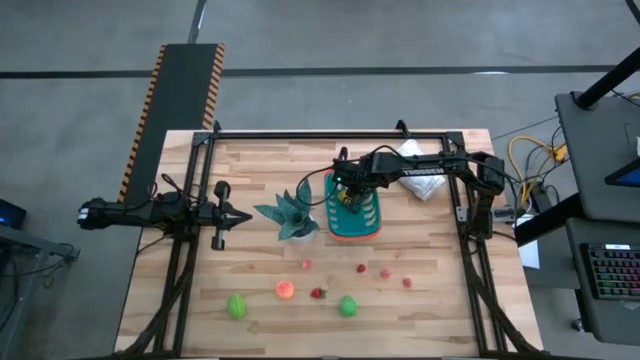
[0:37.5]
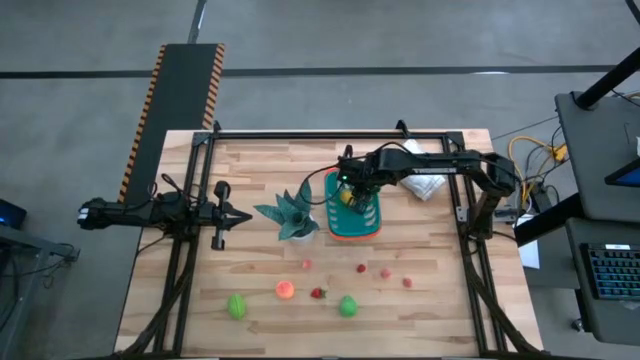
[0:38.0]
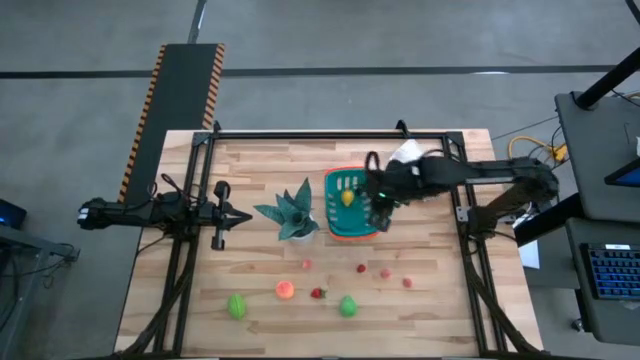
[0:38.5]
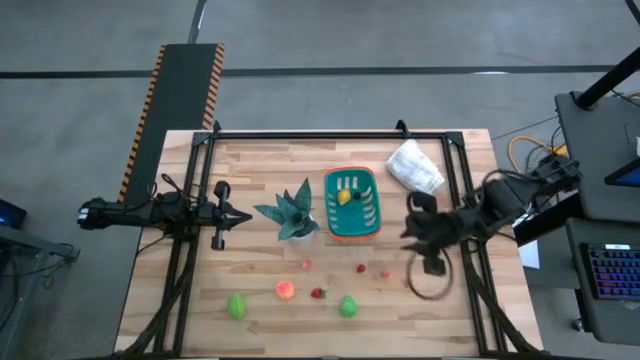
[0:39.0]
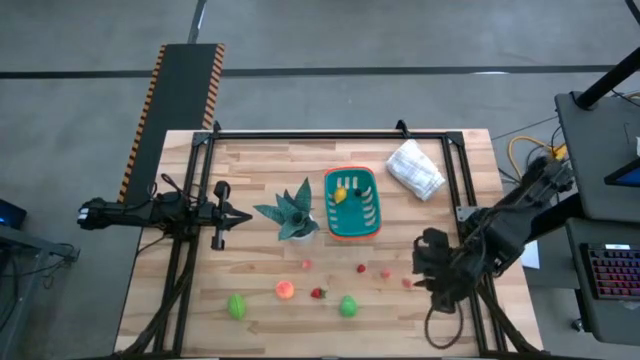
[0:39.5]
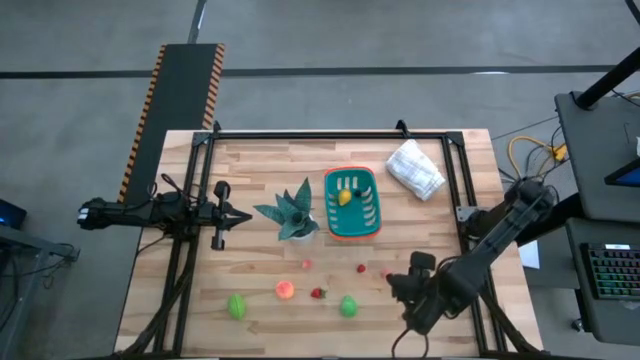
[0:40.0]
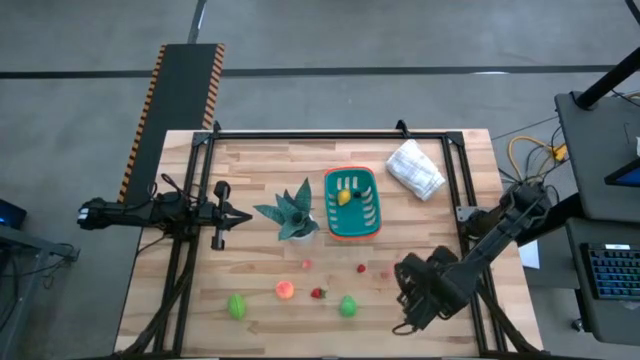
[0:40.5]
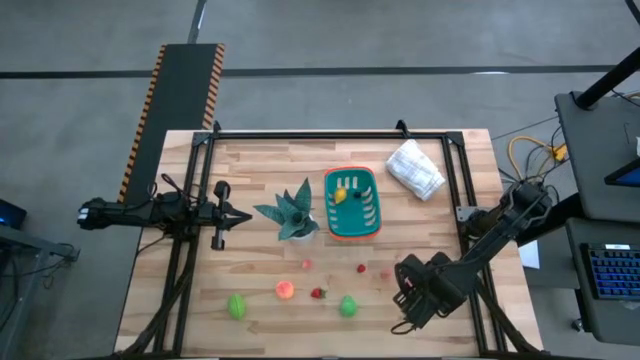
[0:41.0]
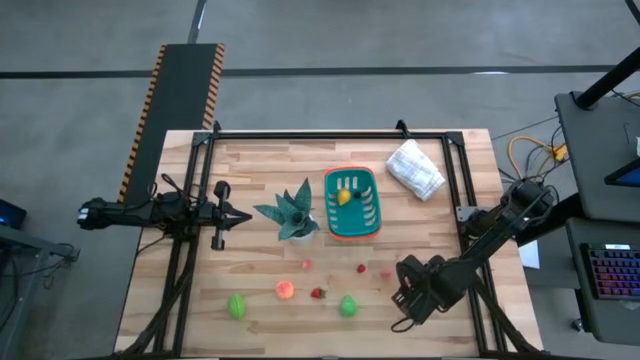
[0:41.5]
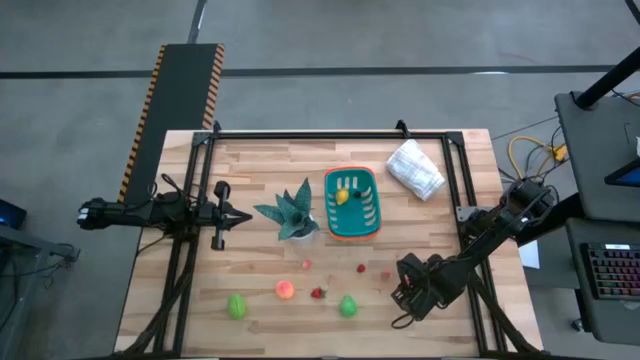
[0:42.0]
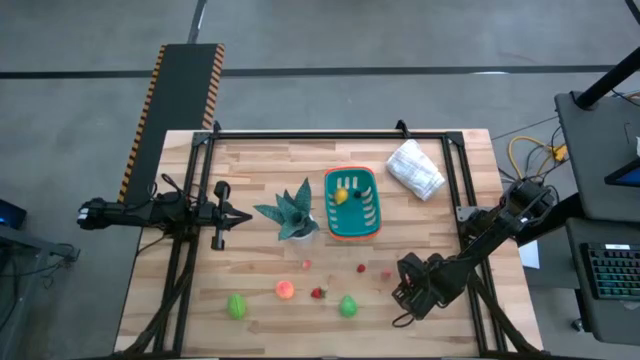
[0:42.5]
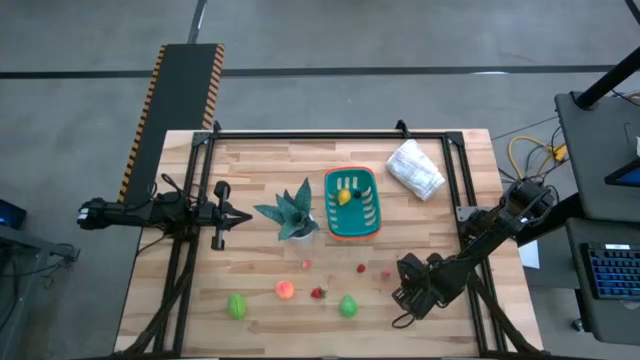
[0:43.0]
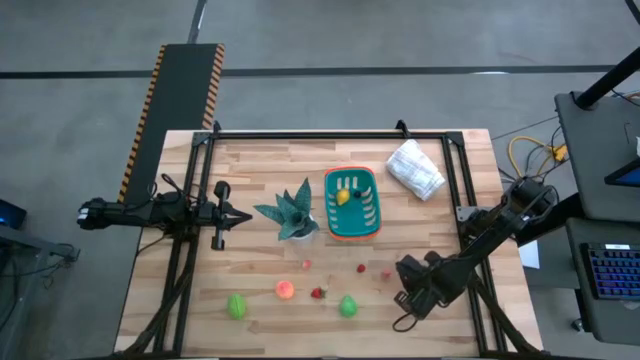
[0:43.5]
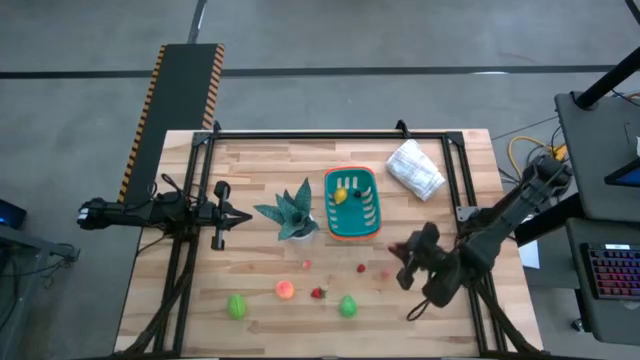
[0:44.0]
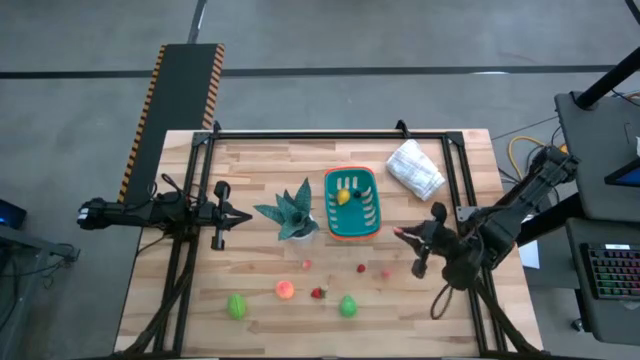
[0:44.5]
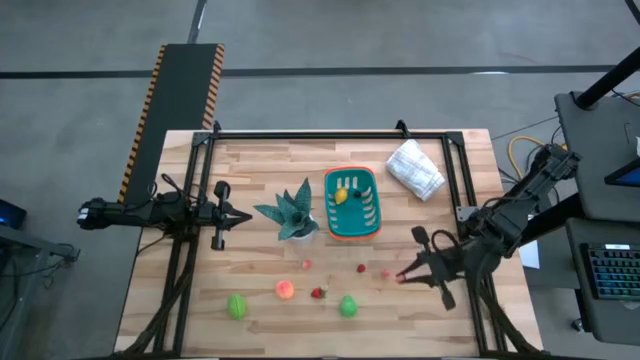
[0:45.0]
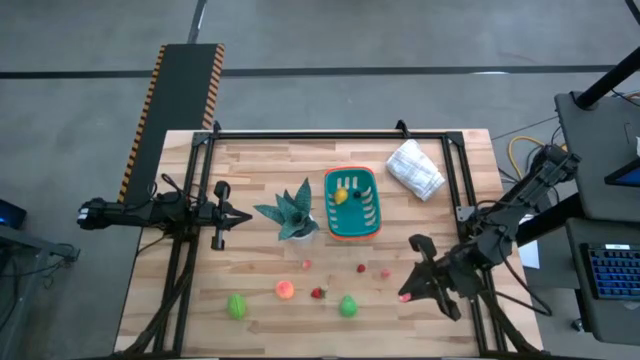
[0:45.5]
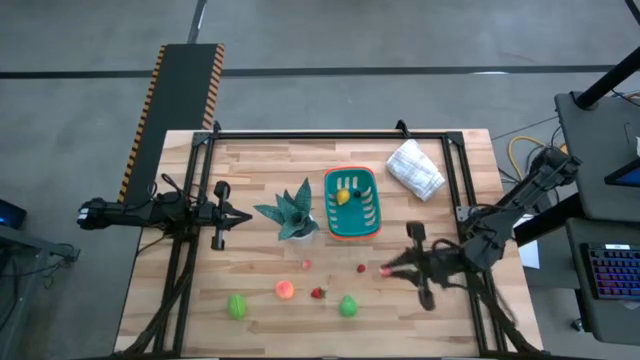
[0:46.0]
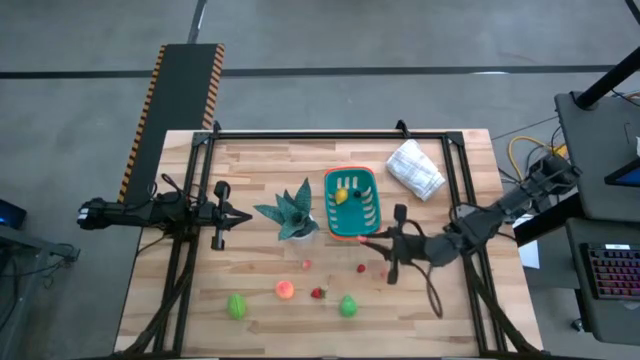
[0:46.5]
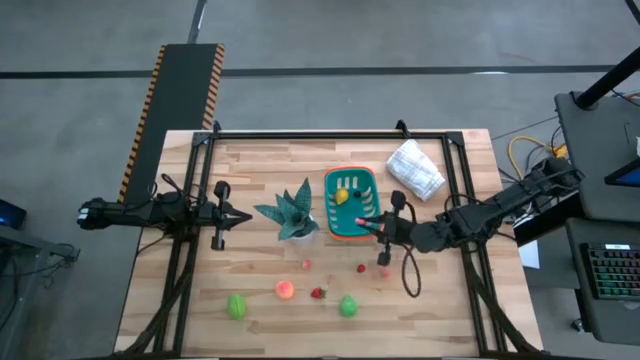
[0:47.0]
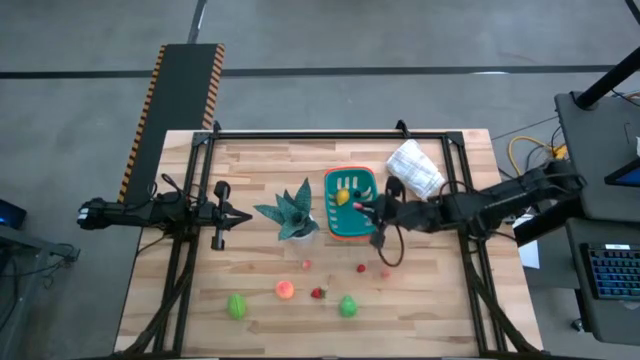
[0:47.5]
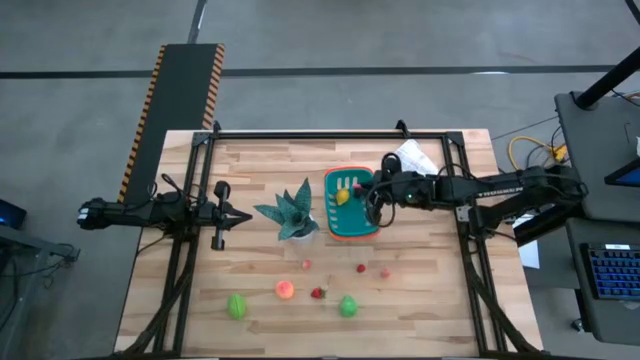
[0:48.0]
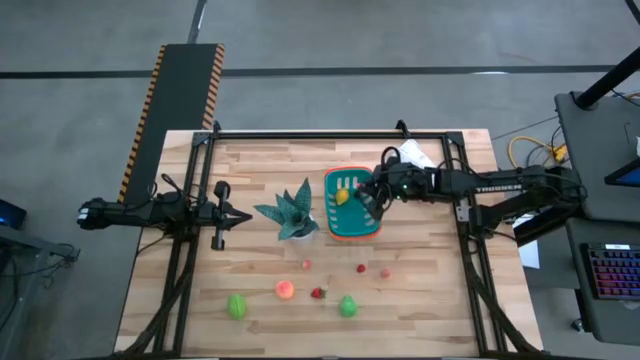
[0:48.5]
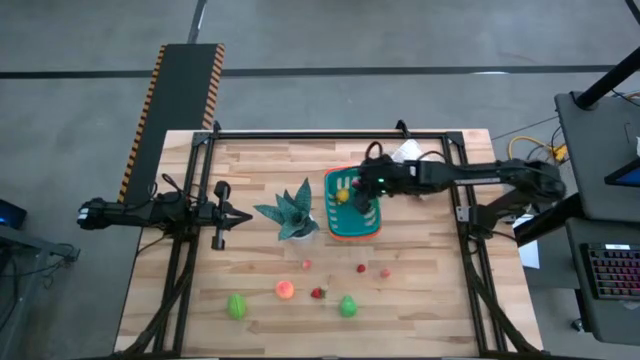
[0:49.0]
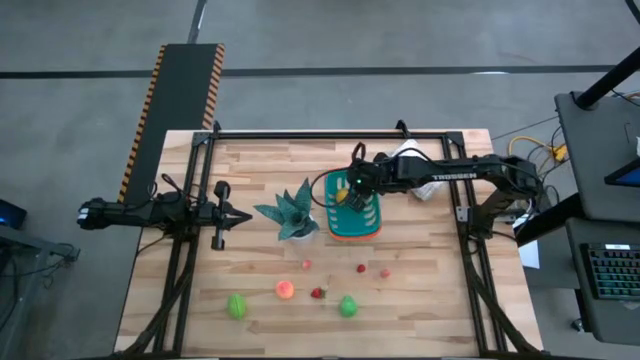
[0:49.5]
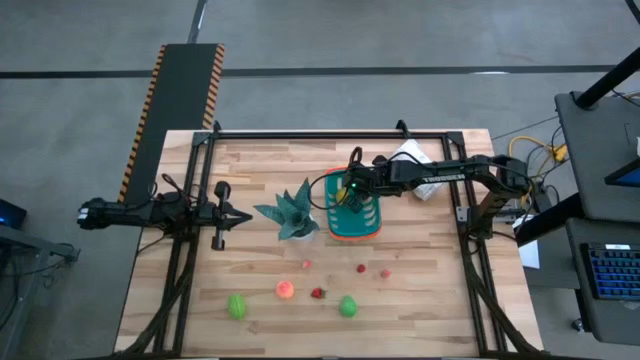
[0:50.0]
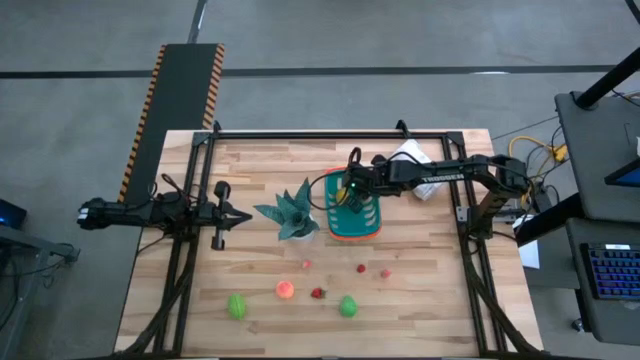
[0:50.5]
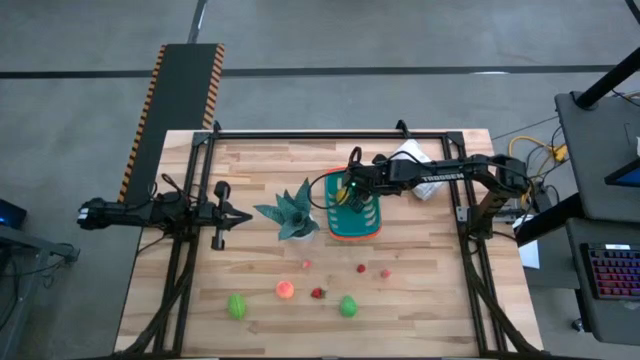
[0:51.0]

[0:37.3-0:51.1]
Task: Build produce basket
Put the peach into the basket

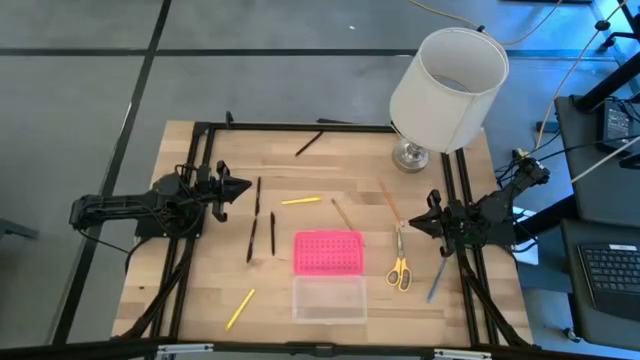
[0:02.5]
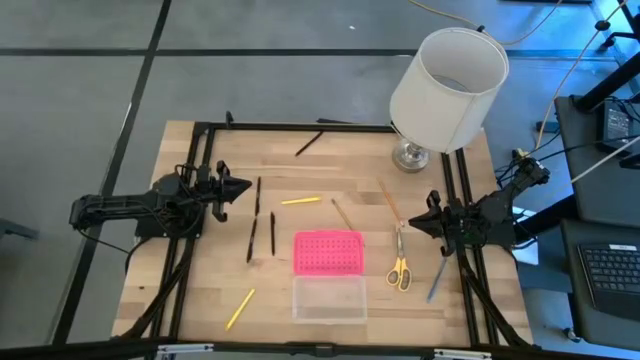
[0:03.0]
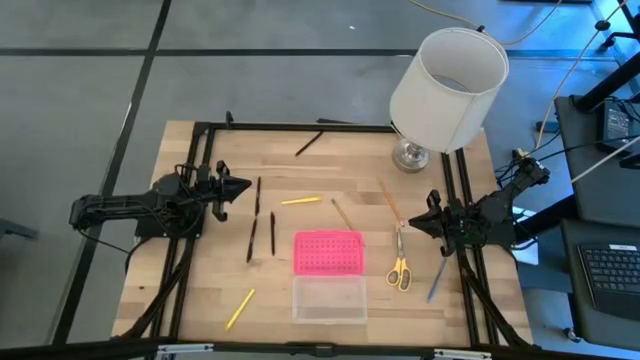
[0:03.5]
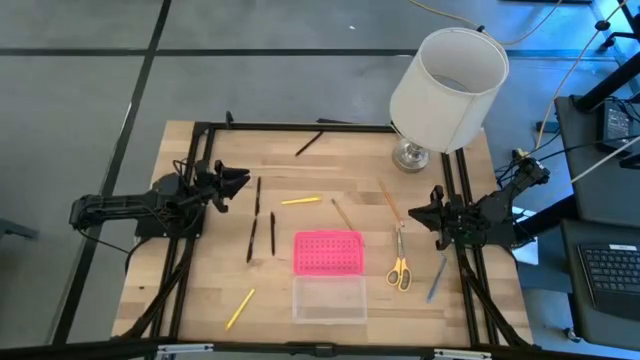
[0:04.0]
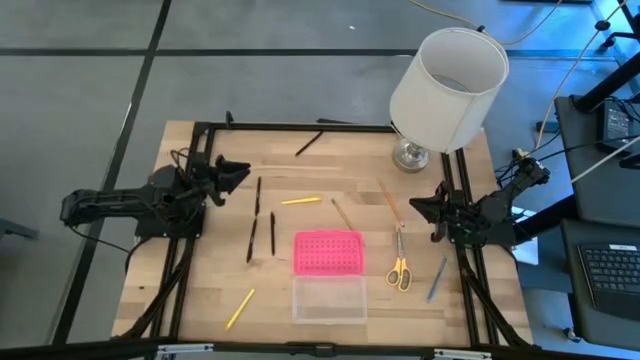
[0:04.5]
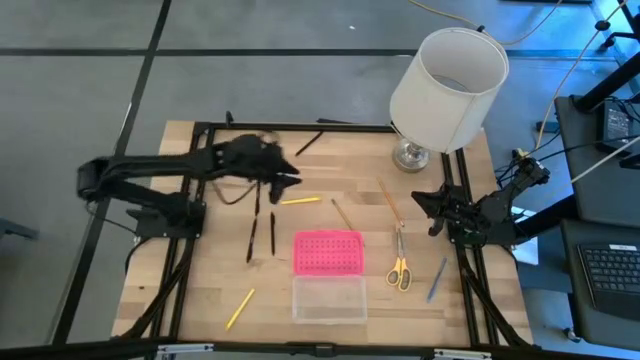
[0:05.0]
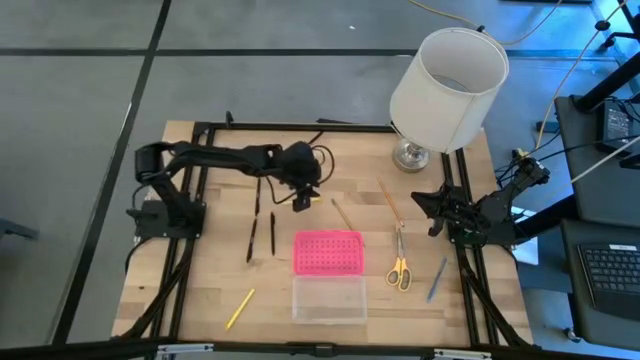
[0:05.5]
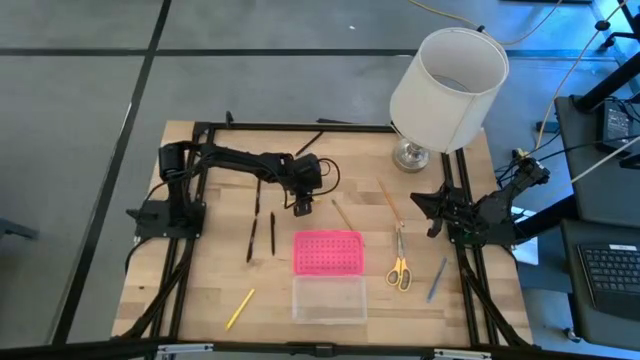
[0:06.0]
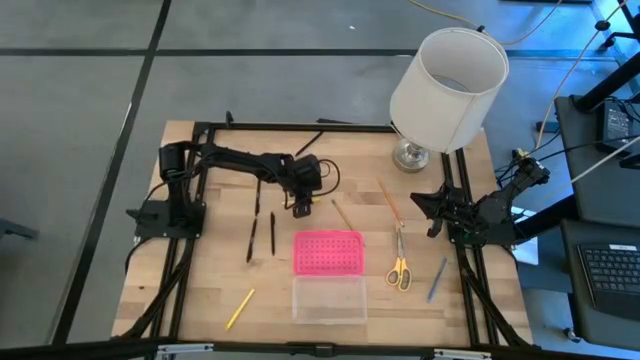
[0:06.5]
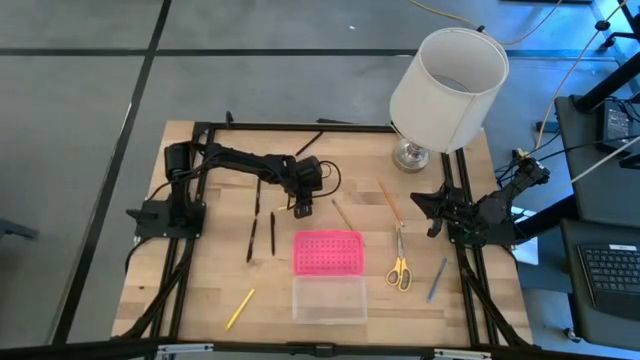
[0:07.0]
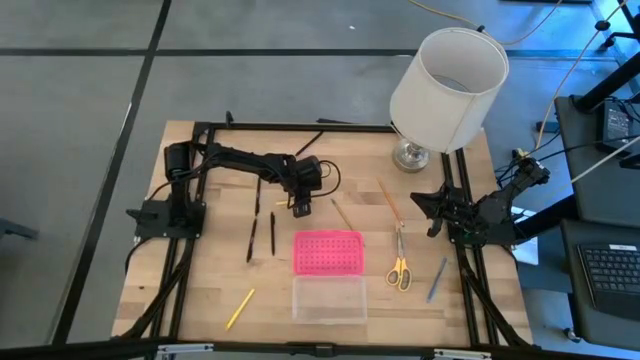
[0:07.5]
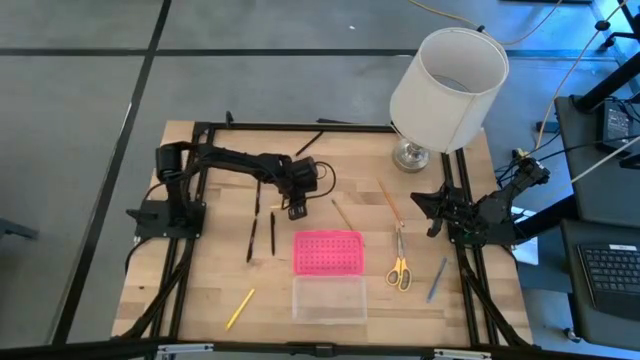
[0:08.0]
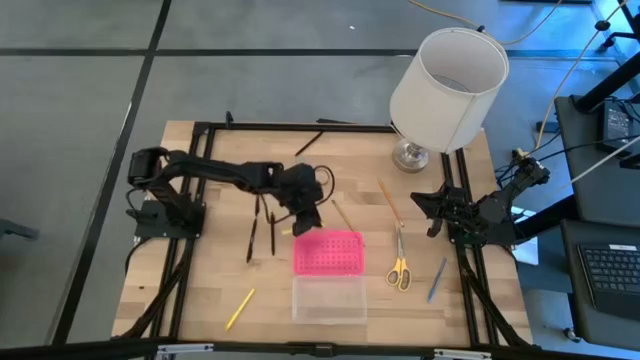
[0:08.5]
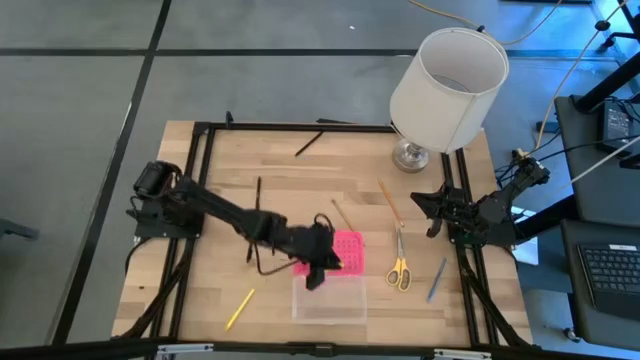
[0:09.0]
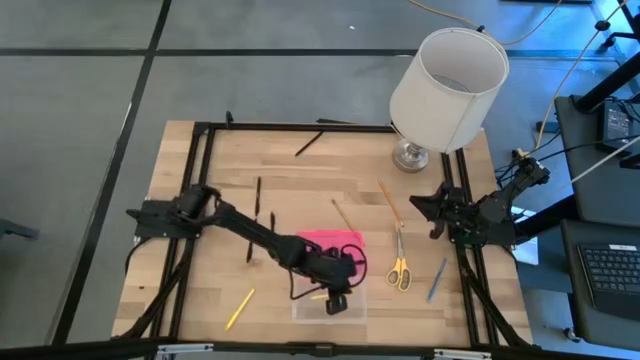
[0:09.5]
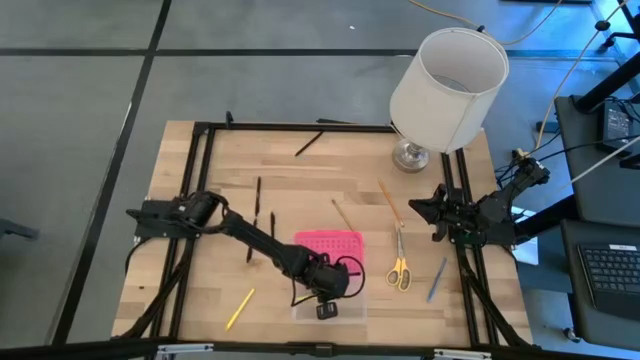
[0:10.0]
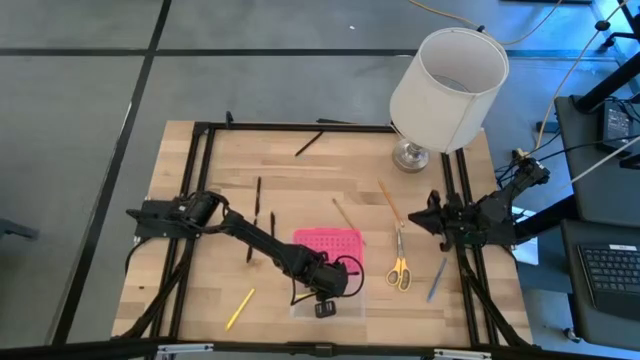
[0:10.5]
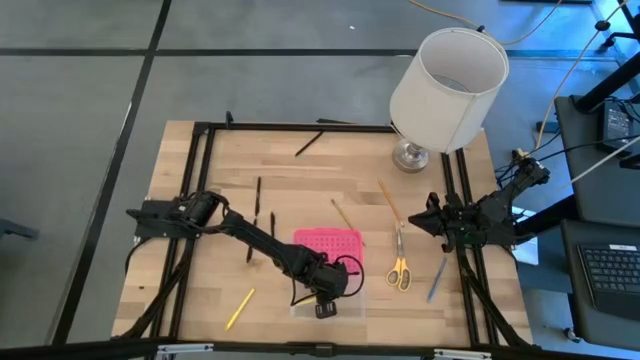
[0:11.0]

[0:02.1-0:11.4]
Task: Pick & place school supplies into a supply box
Put the yellow pen into the pink supply box
